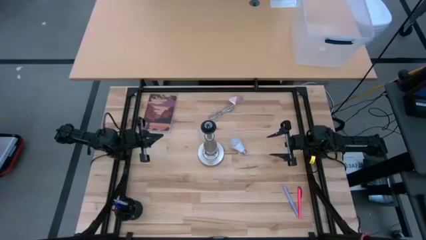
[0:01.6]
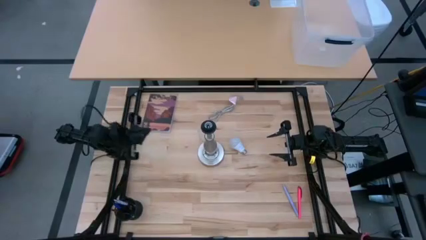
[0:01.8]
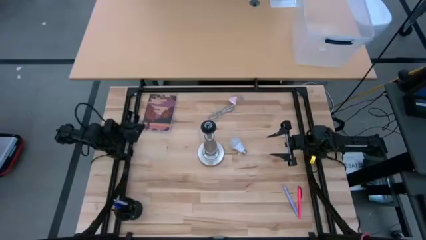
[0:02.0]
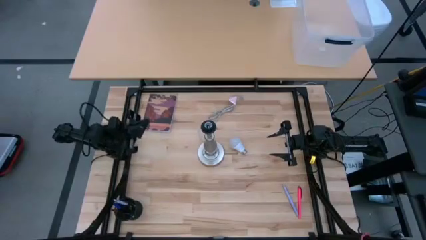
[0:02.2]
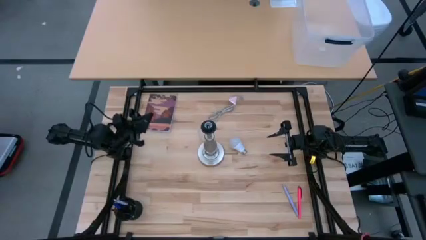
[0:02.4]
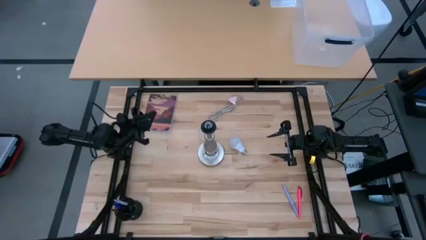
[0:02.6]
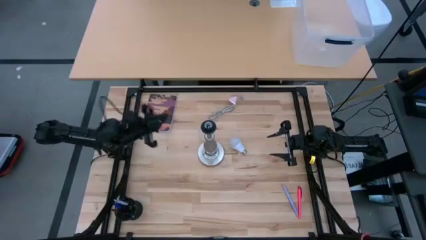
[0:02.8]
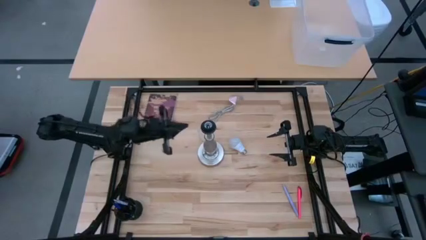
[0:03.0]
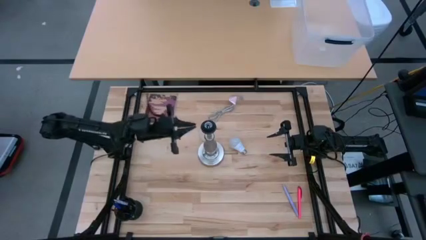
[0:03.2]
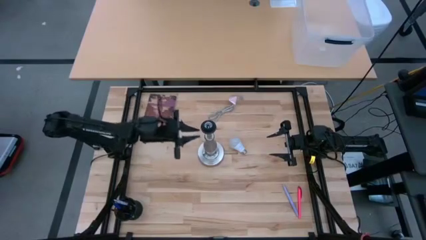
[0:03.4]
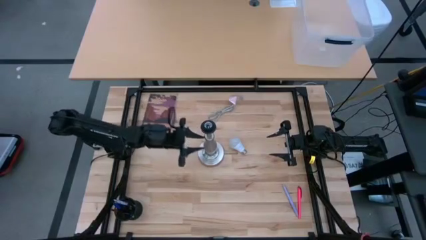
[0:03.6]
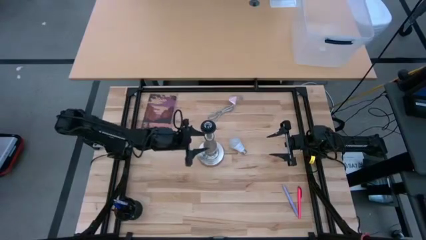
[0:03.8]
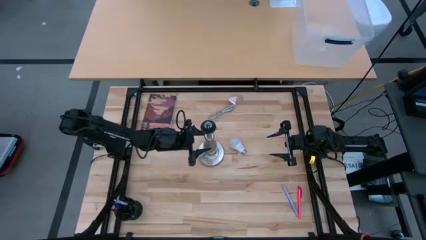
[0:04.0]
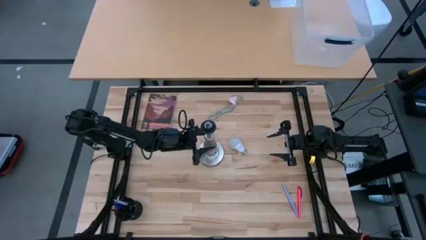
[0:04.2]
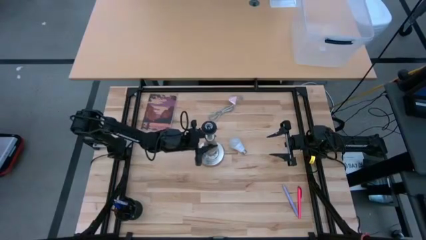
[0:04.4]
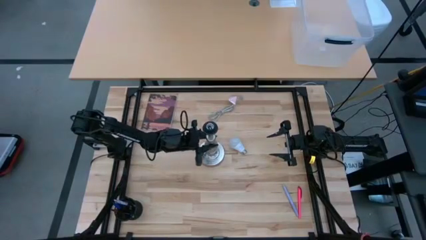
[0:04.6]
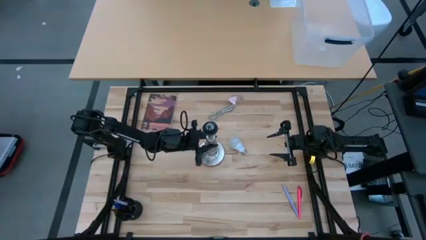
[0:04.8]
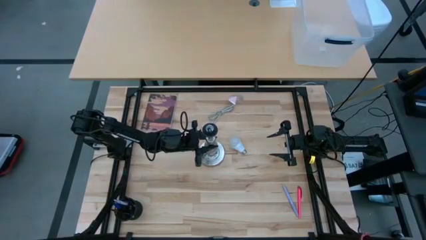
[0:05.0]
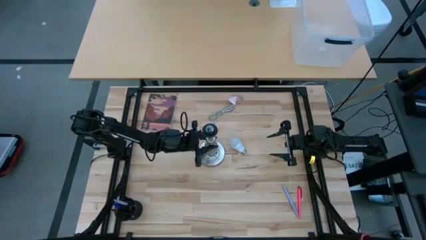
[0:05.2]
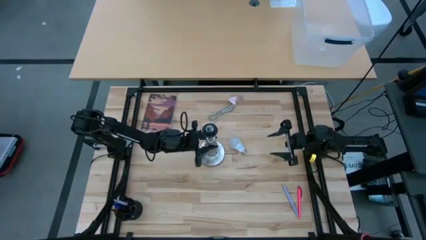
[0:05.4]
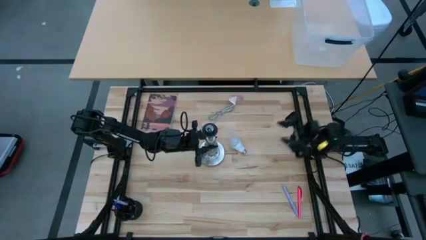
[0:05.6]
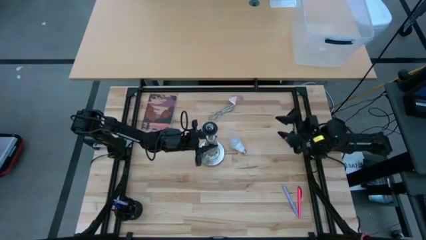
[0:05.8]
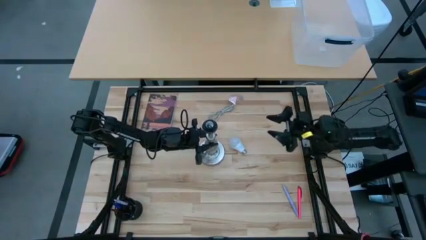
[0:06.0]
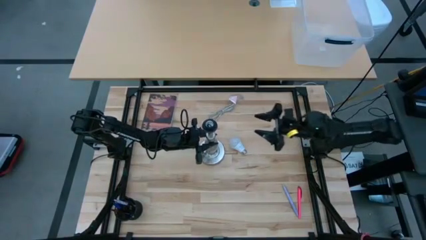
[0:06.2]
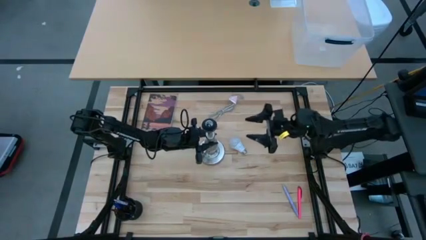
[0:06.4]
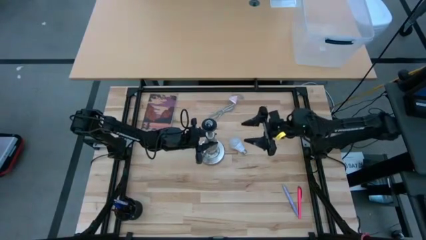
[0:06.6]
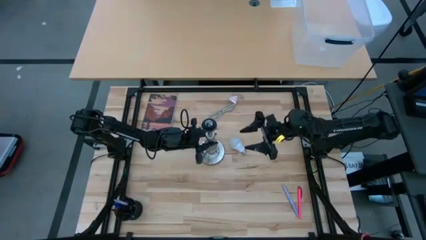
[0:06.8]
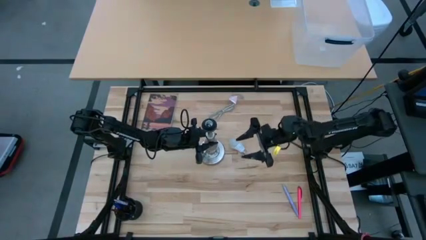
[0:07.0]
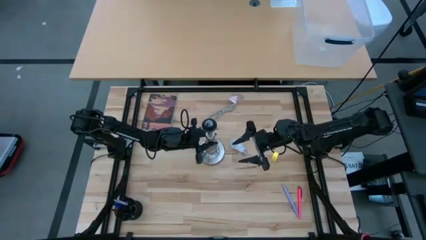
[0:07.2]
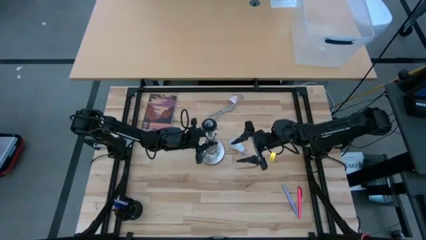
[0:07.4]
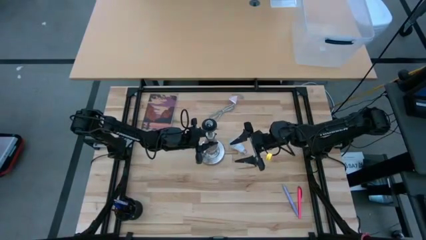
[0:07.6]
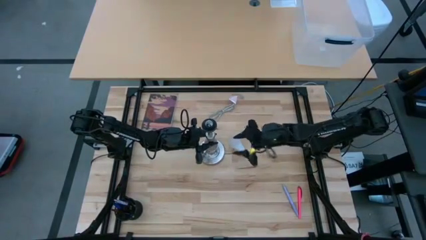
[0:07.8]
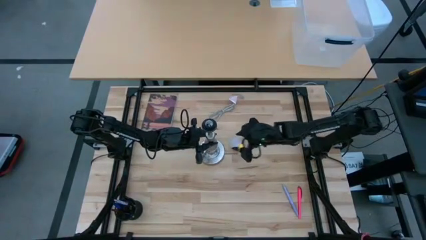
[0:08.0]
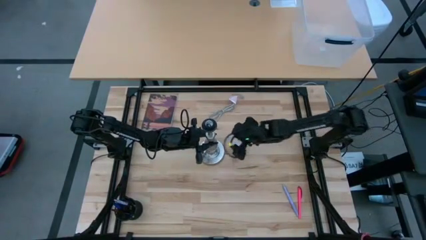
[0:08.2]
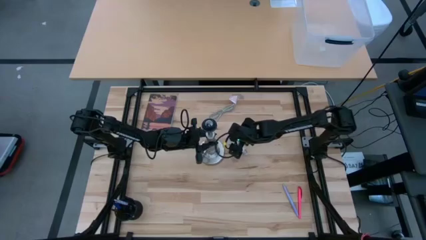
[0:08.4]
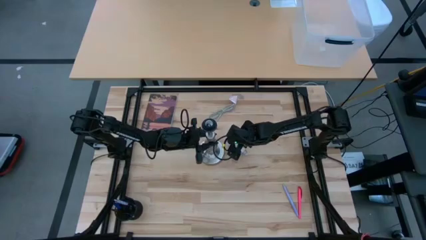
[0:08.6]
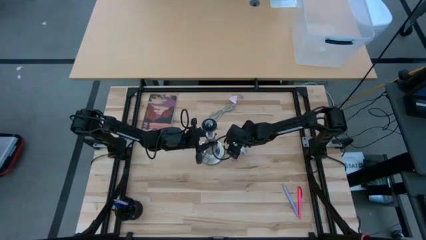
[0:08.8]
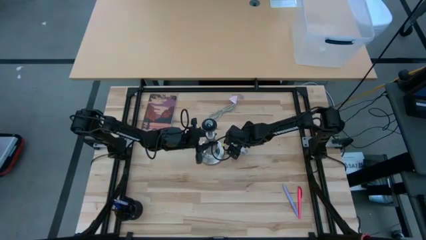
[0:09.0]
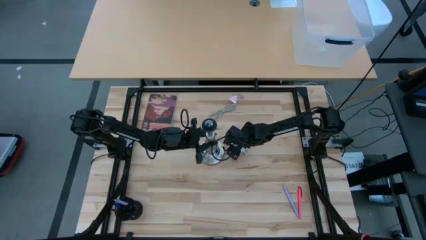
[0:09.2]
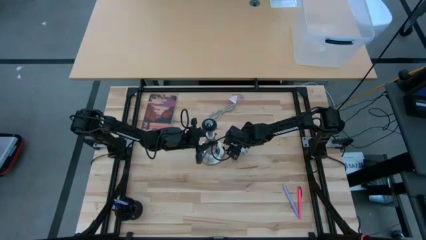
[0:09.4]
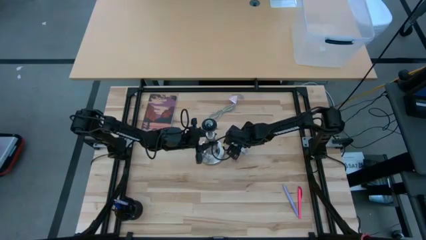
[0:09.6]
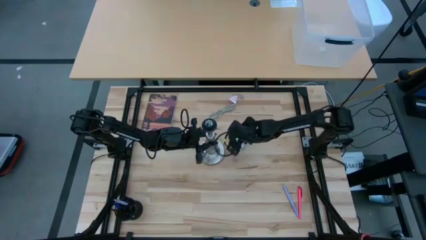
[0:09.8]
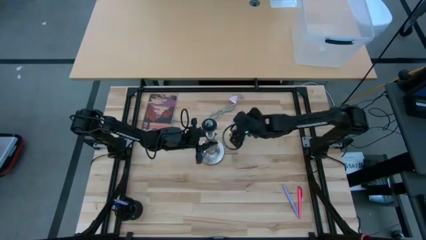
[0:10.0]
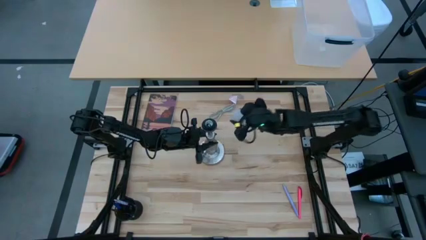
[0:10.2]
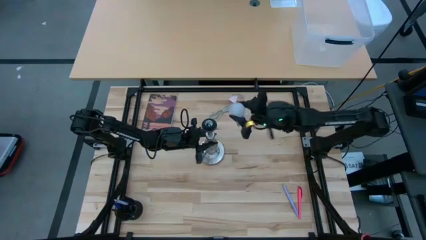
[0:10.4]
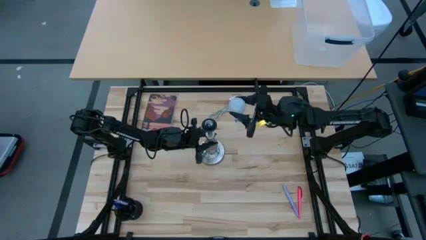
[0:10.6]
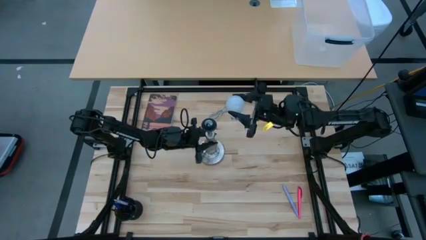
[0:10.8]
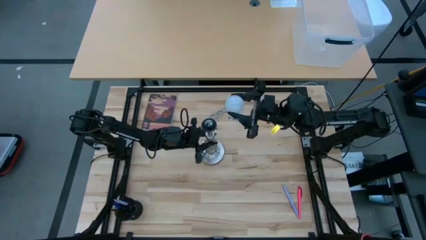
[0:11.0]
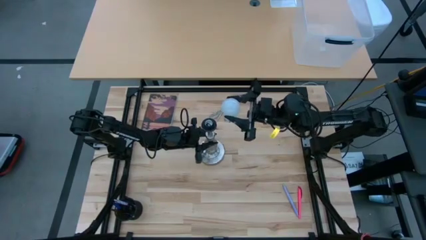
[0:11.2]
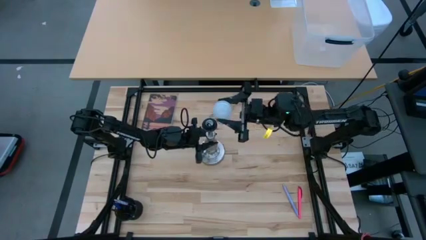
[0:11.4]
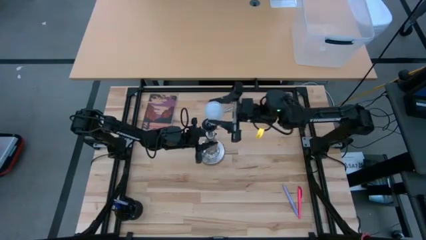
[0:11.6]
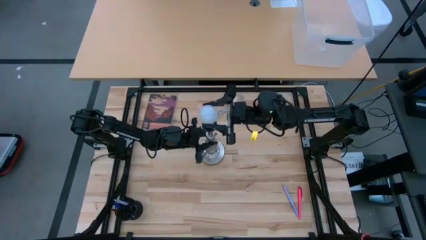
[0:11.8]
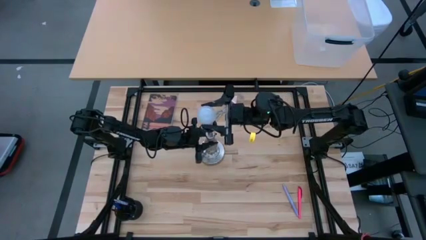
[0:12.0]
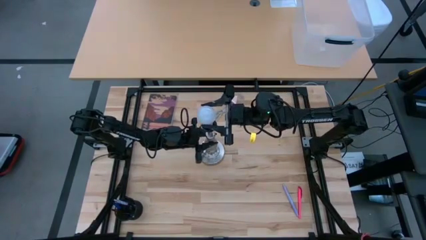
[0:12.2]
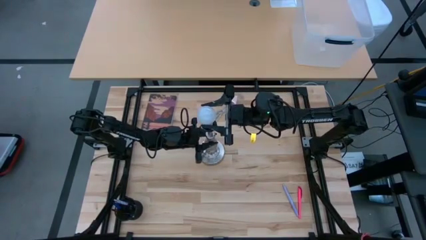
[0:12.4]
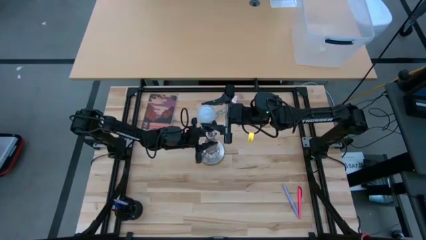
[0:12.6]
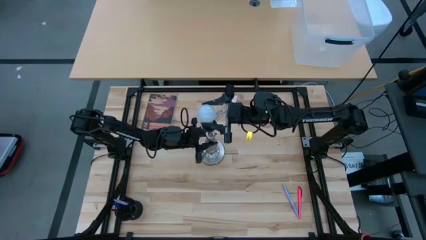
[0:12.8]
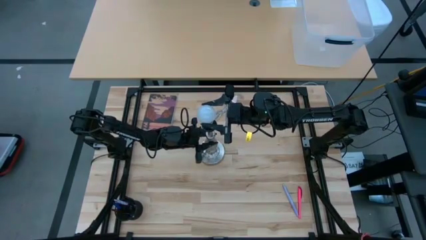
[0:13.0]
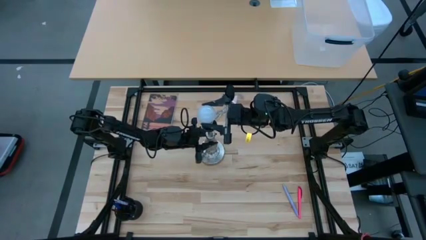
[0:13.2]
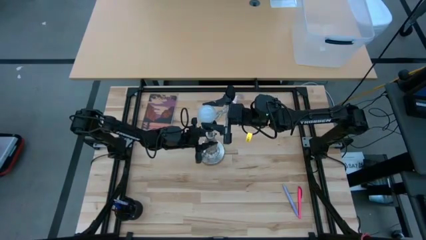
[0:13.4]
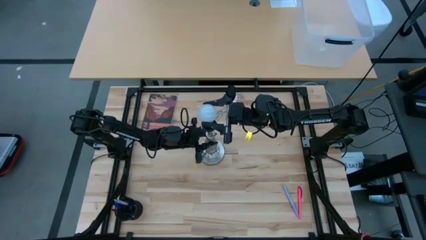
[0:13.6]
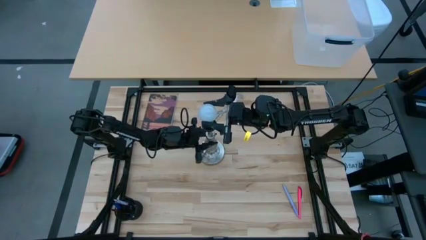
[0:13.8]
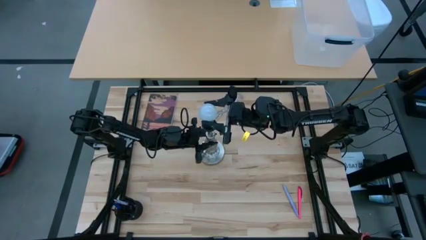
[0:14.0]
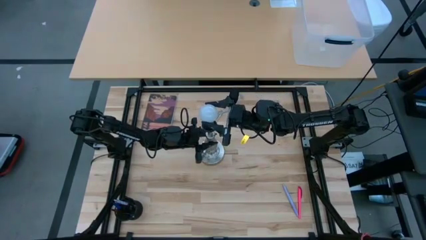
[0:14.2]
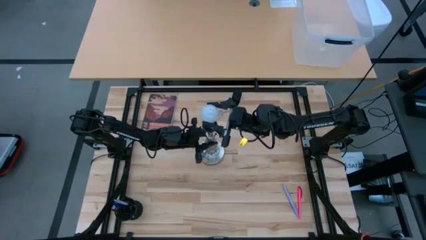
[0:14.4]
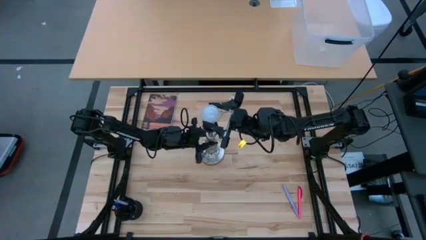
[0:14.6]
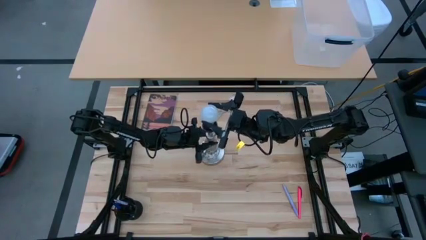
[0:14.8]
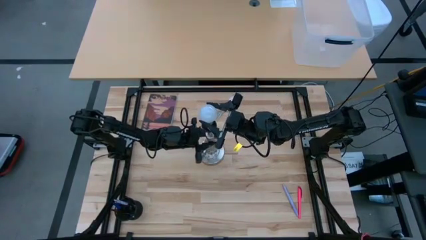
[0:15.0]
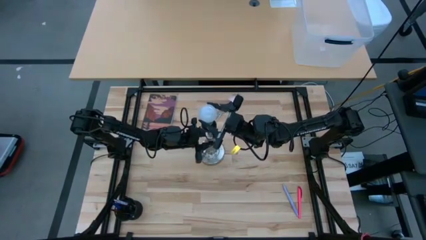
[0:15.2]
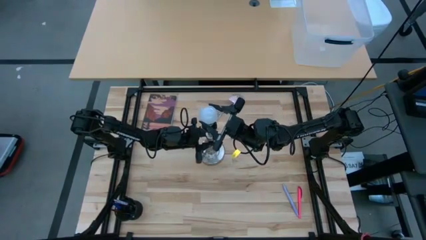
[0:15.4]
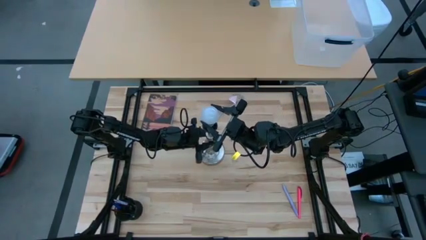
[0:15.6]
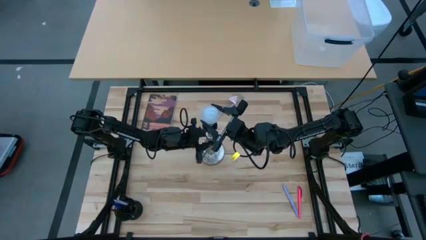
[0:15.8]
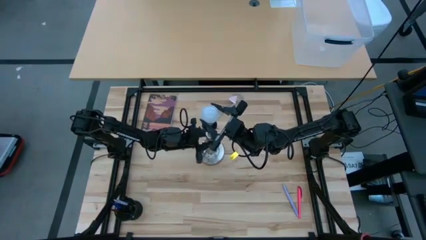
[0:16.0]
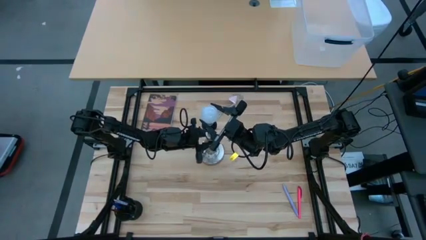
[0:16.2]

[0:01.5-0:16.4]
Task: Screw lightbulb
Insert the lightbulb into the silver lamp
